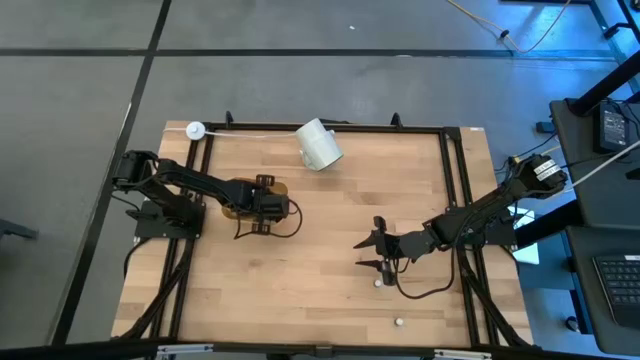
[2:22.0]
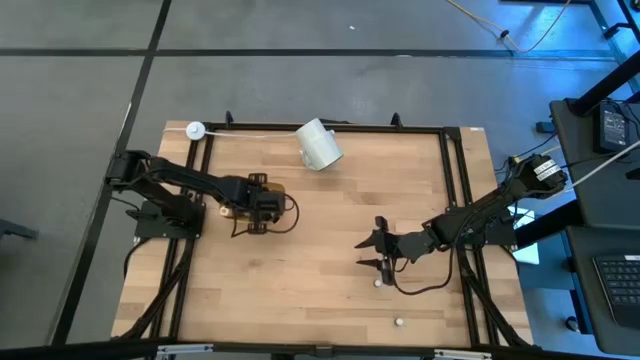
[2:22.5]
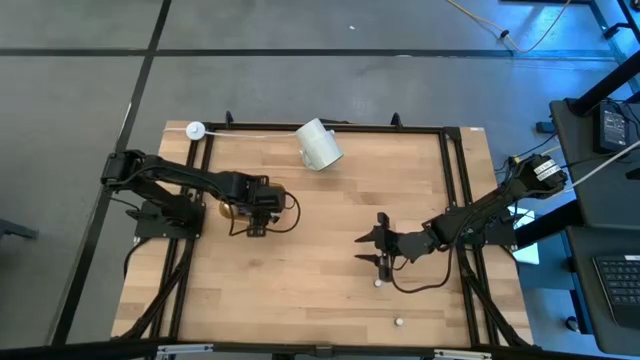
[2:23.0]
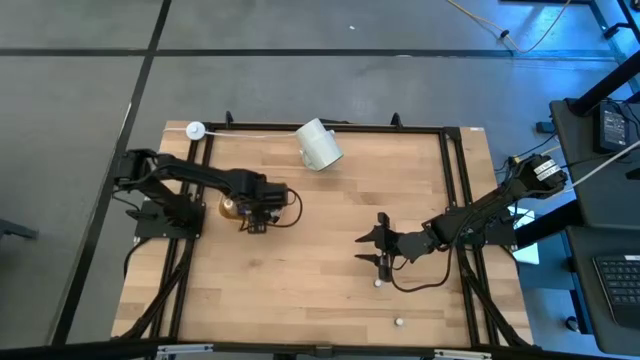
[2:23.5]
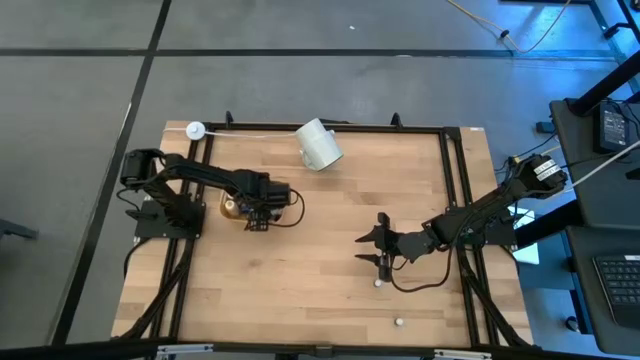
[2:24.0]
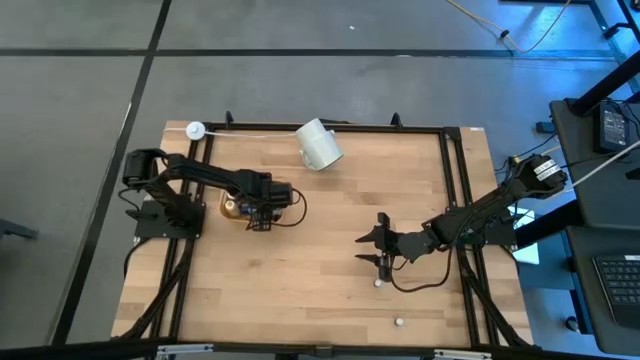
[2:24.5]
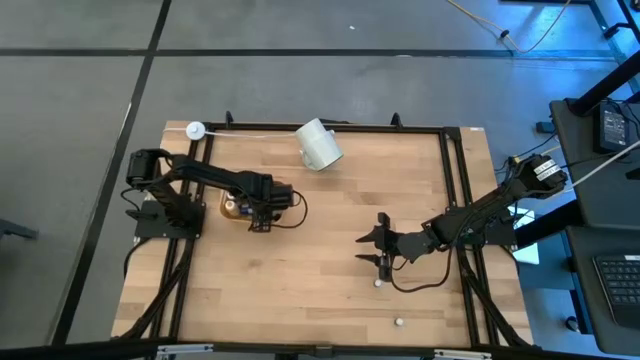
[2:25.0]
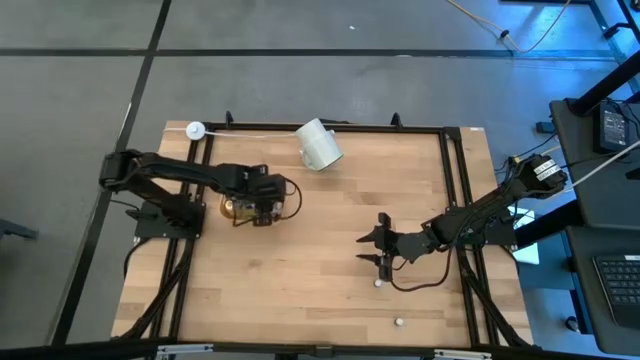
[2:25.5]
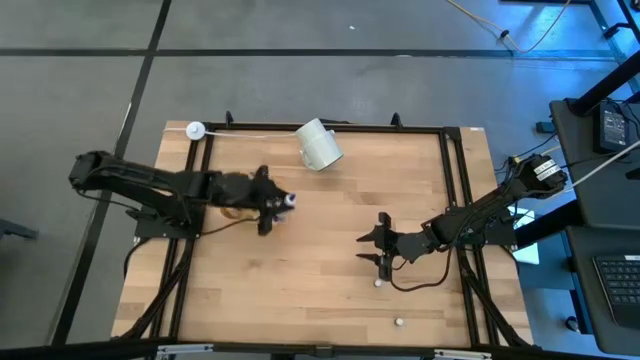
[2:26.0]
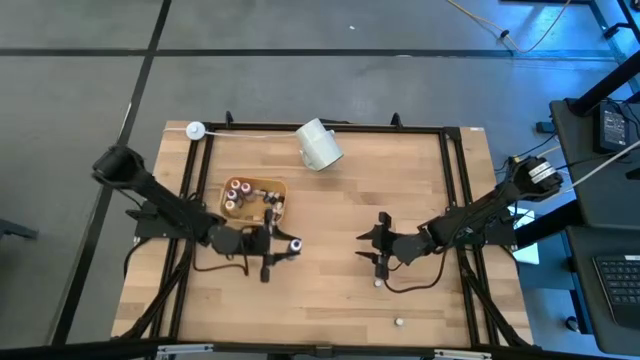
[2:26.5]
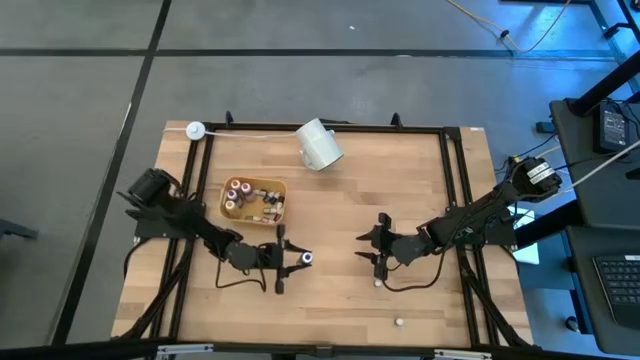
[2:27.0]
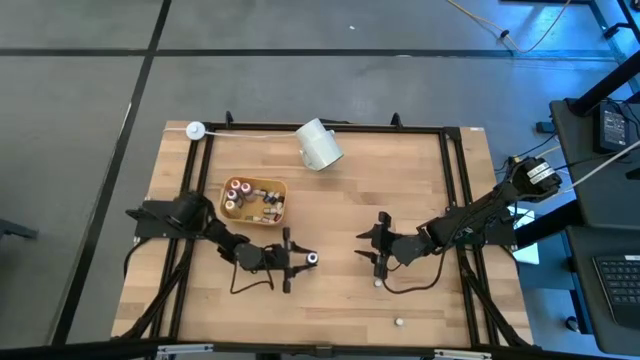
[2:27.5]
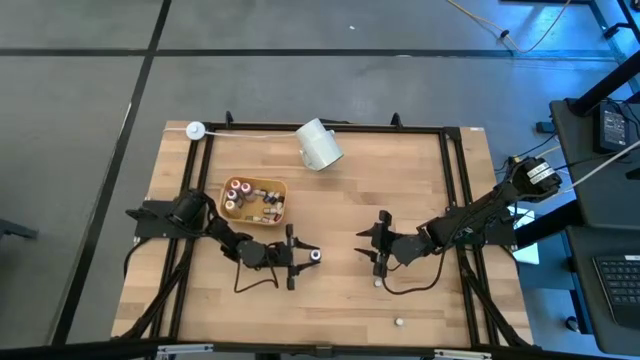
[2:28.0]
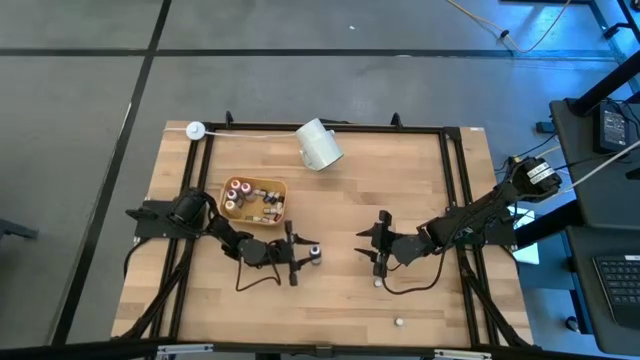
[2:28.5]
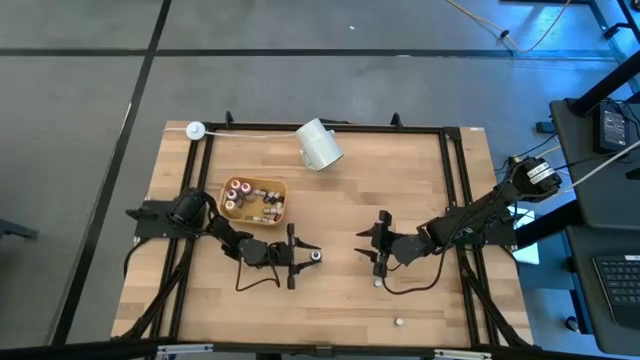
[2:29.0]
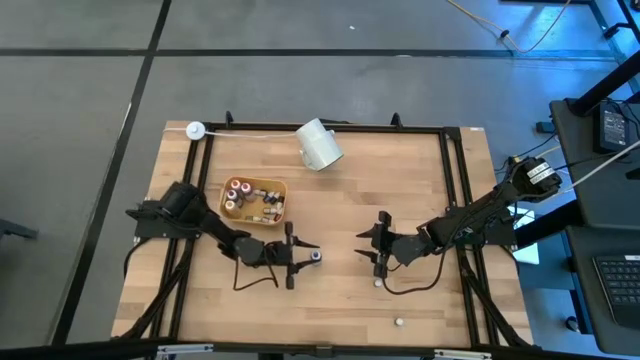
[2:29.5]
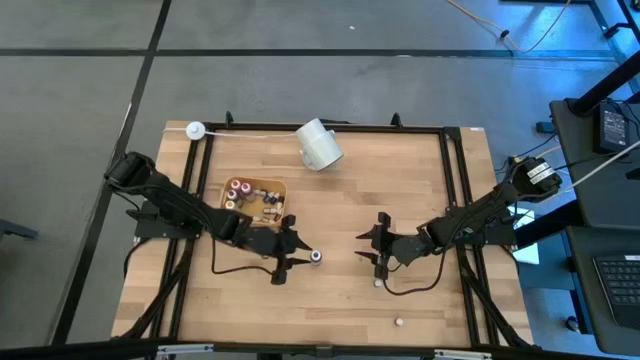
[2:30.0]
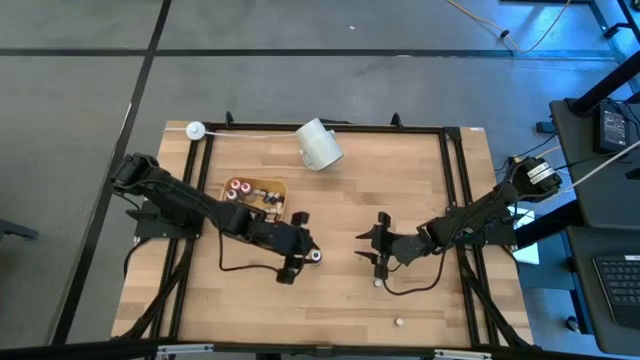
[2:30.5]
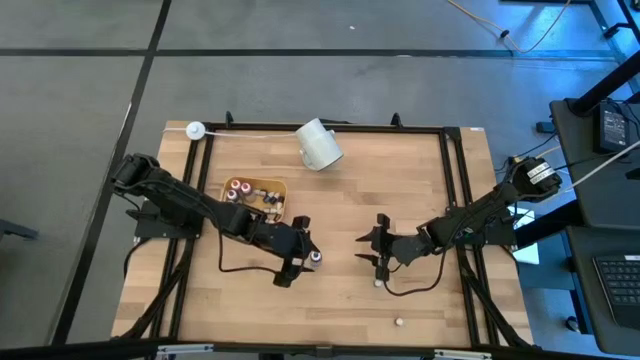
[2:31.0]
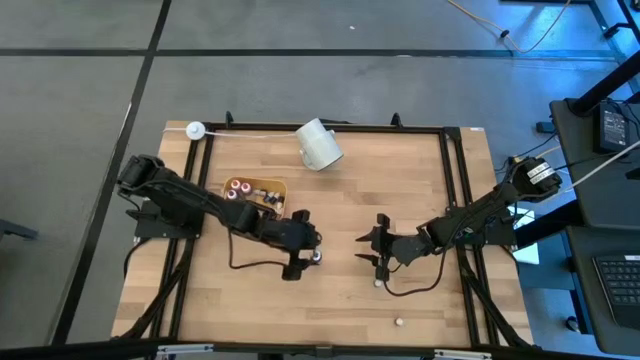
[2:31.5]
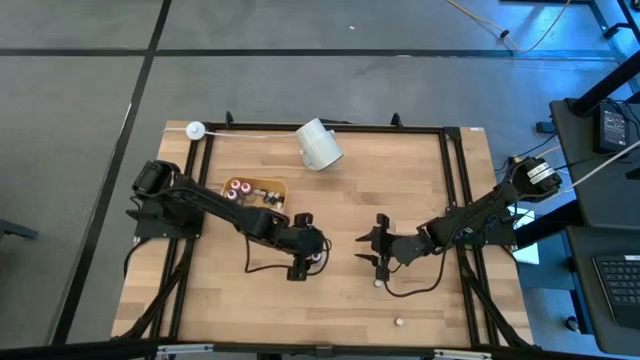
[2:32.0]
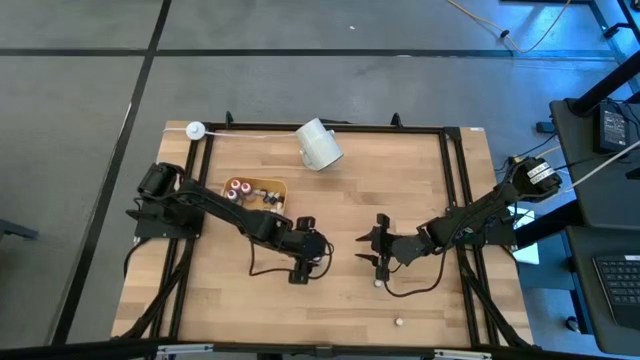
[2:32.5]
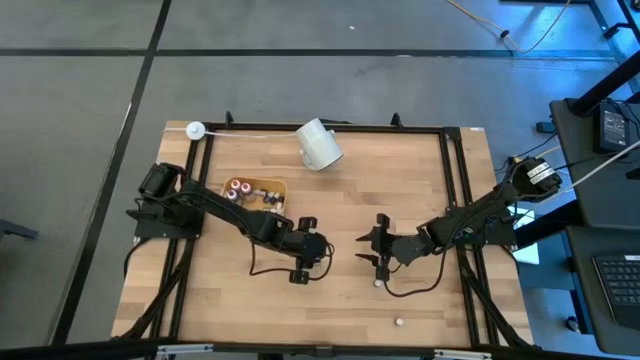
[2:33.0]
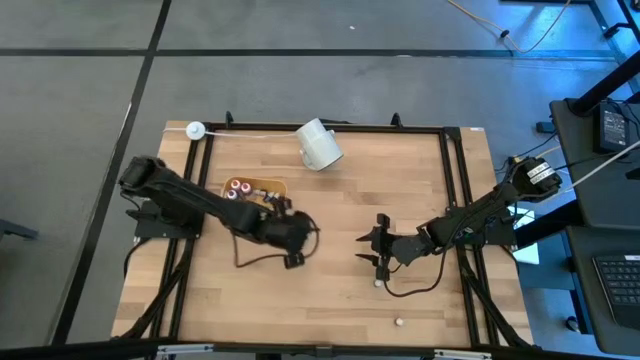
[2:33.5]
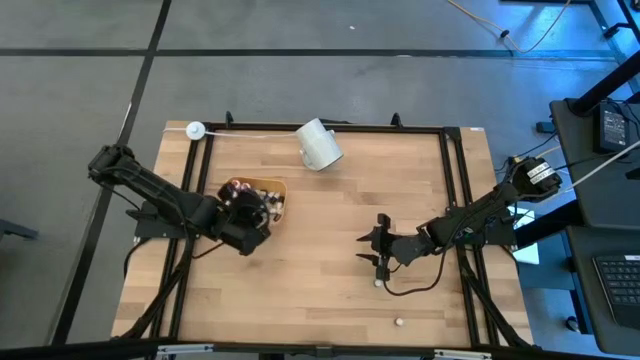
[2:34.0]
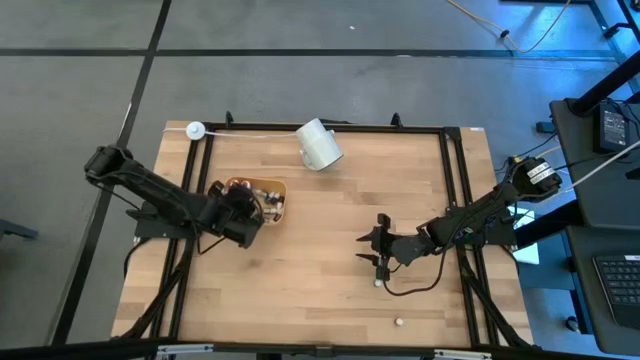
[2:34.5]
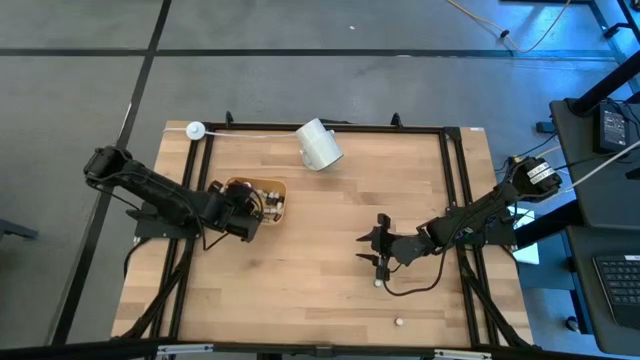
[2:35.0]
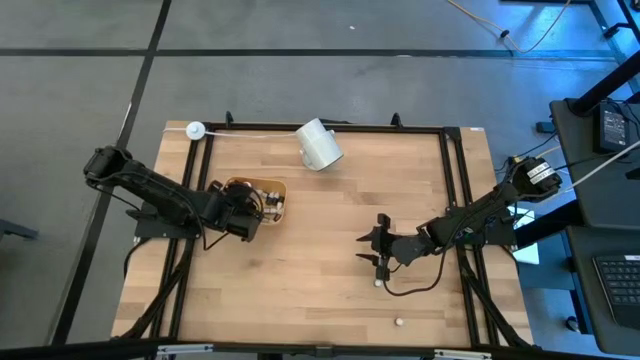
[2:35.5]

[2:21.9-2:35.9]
Task: Pick & Place food coloring
Put the large blue food coloring bottle into the bin

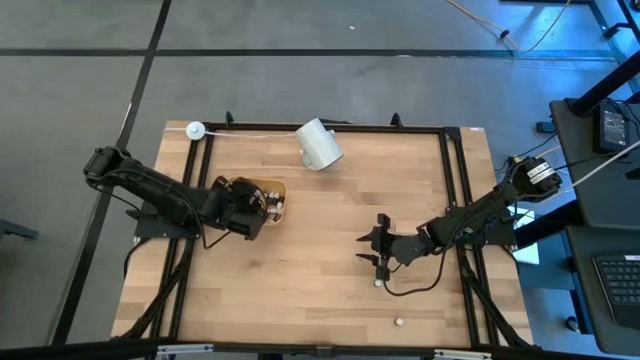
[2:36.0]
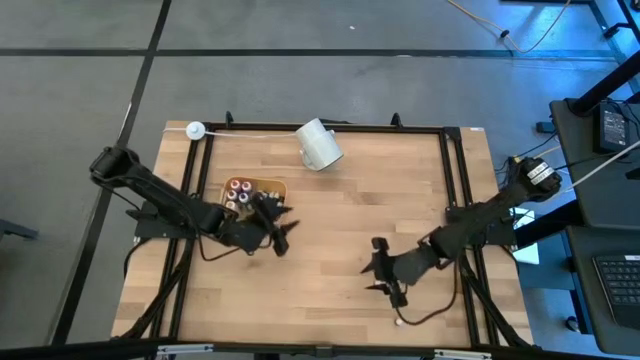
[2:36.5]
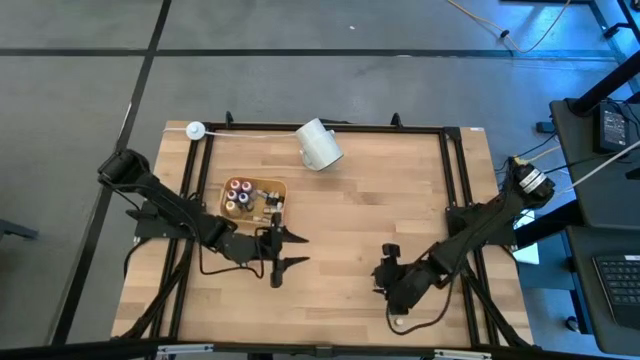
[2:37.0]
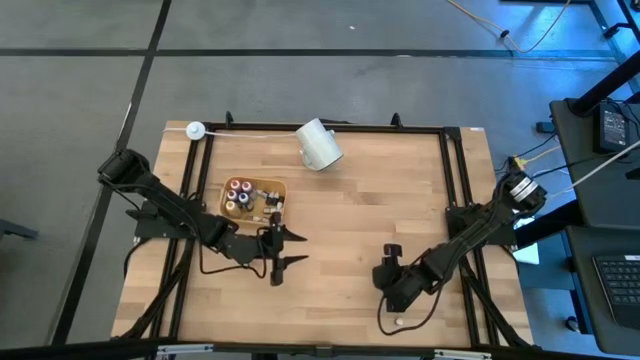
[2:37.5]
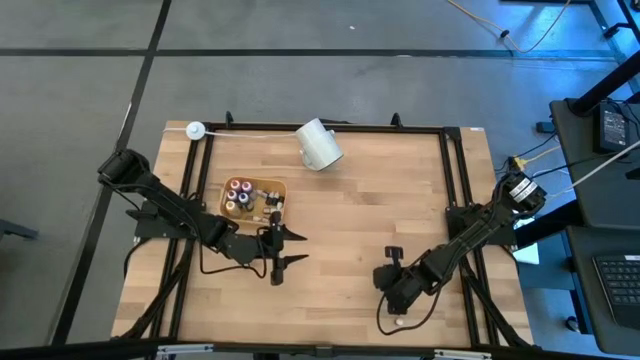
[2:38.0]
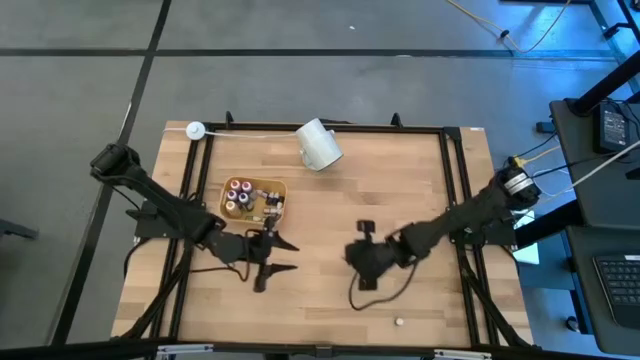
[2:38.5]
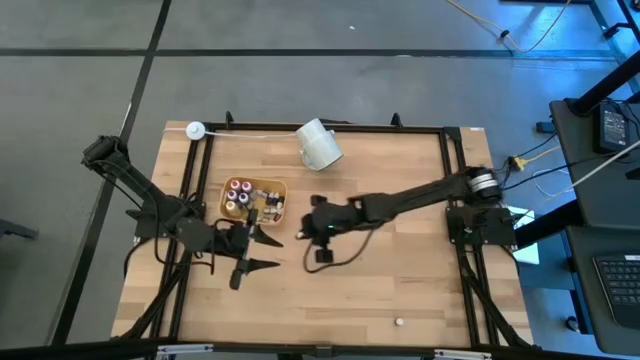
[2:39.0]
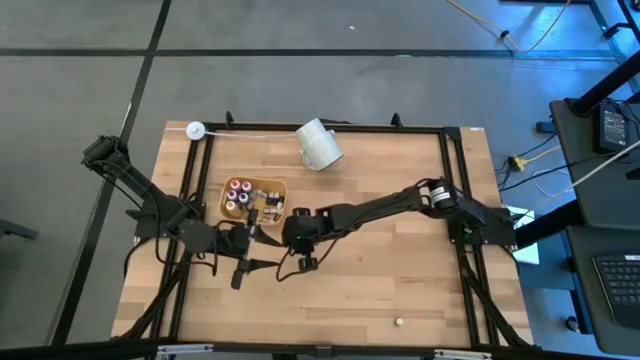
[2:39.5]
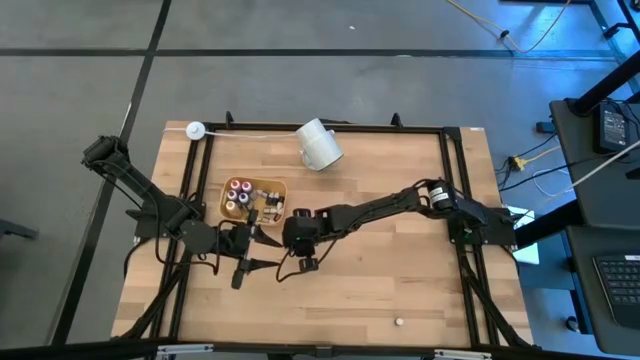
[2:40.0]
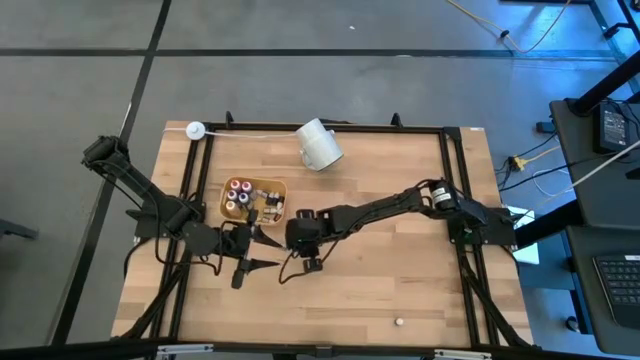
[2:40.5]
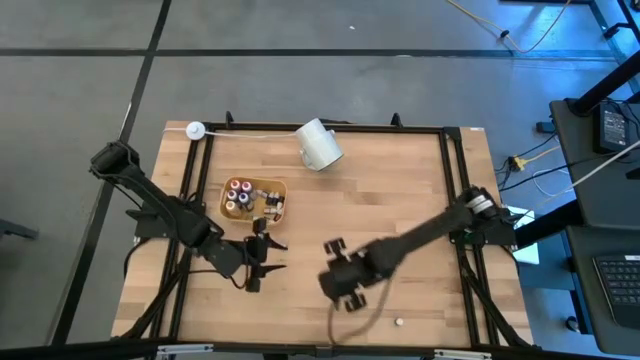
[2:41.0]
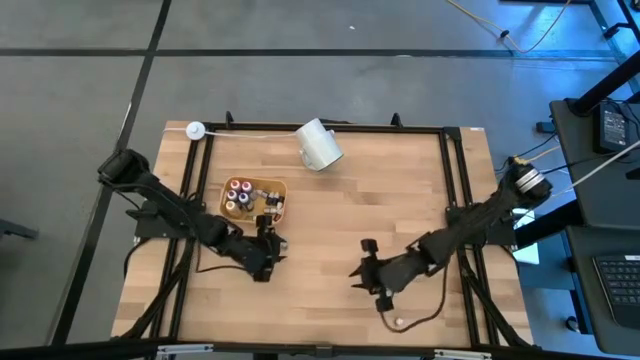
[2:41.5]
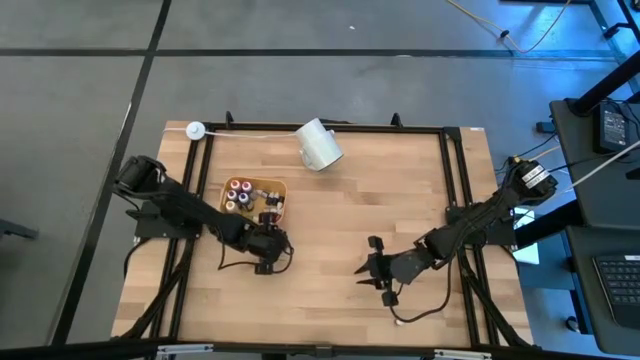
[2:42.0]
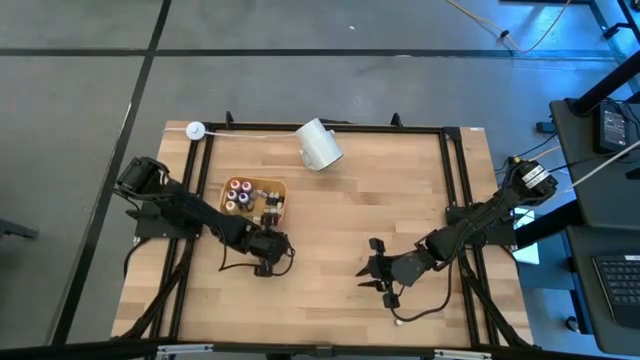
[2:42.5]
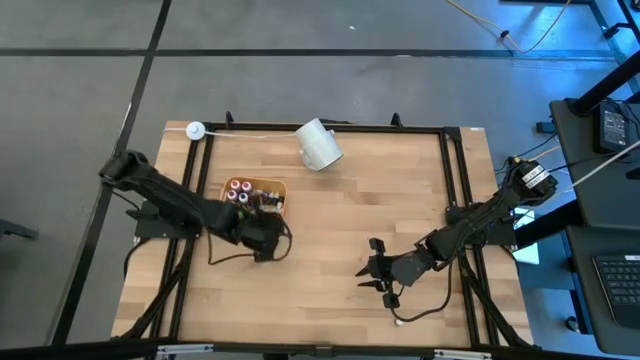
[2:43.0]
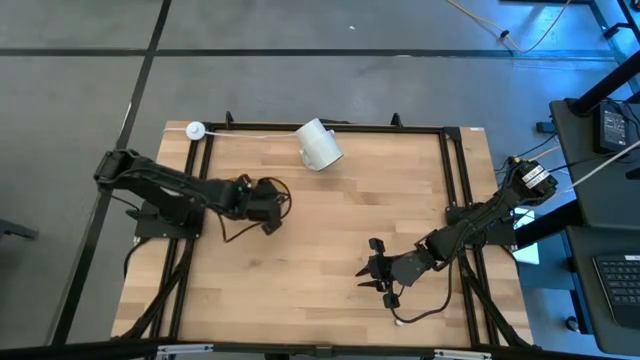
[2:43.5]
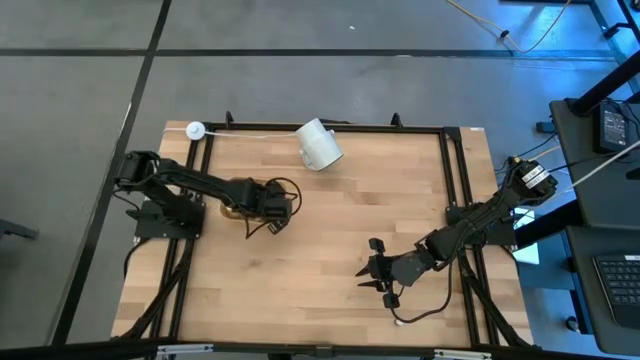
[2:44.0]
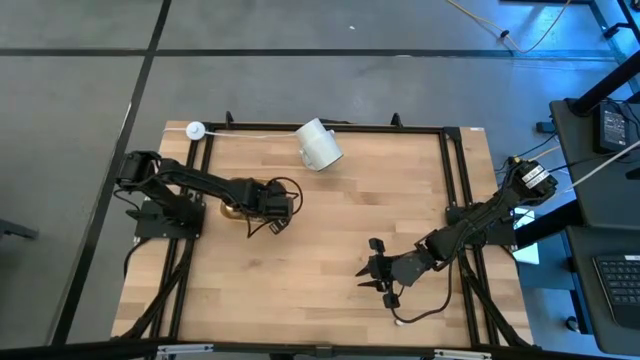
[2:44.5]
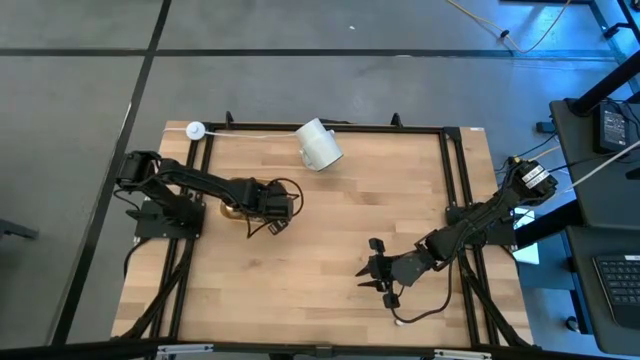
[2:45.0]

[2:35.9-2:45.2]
Put the small blue food coloring bottle into the yellow bin
